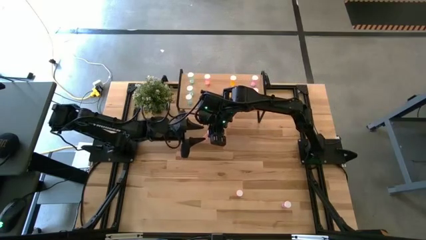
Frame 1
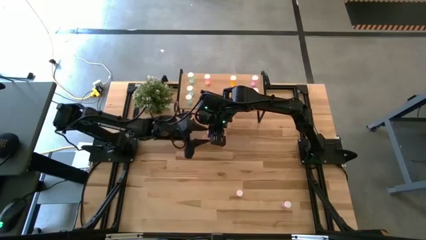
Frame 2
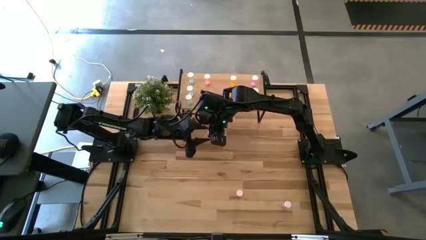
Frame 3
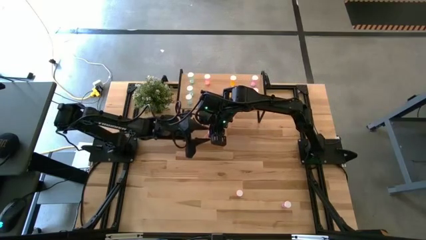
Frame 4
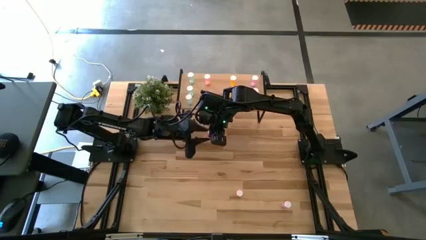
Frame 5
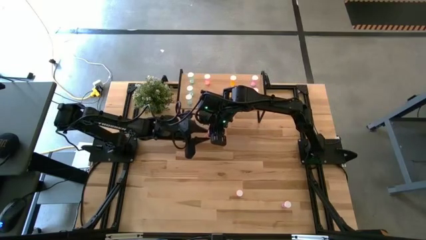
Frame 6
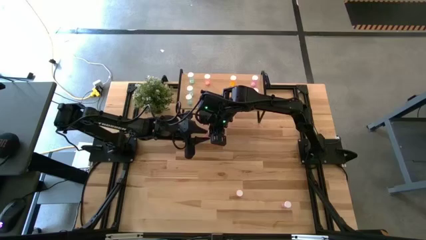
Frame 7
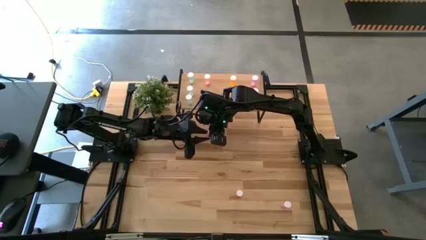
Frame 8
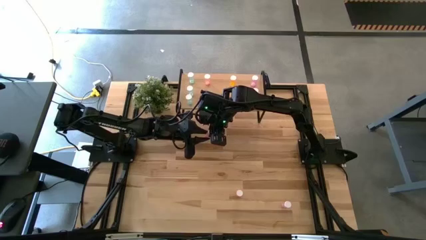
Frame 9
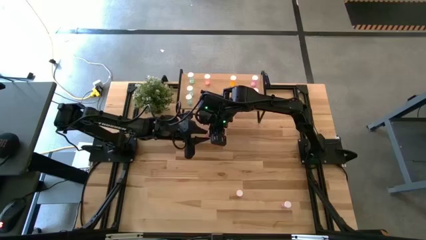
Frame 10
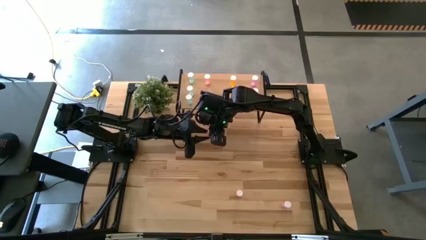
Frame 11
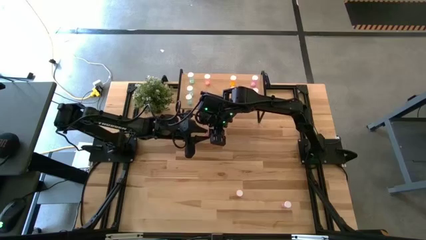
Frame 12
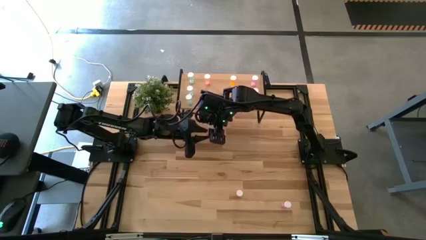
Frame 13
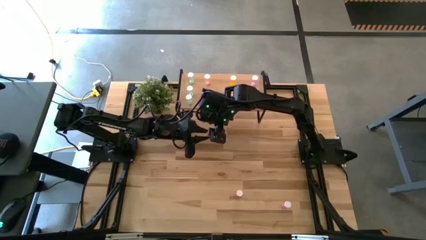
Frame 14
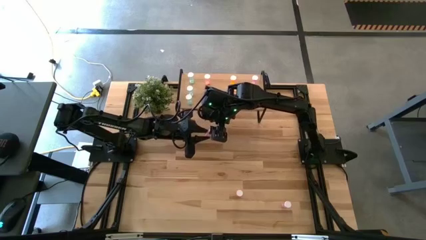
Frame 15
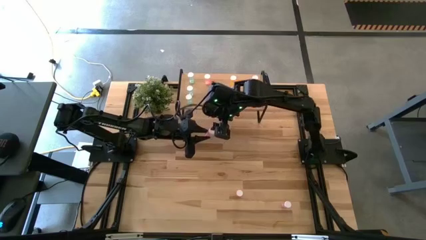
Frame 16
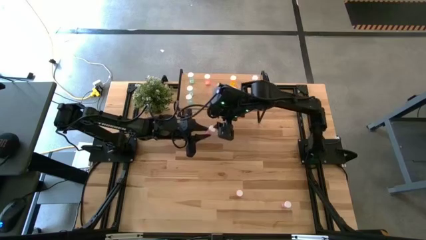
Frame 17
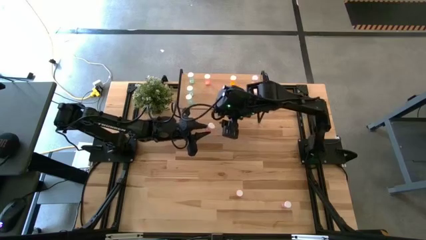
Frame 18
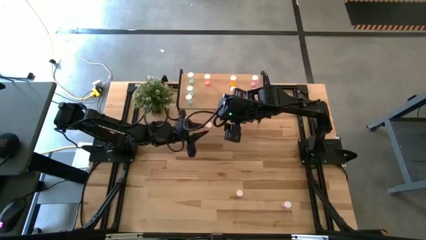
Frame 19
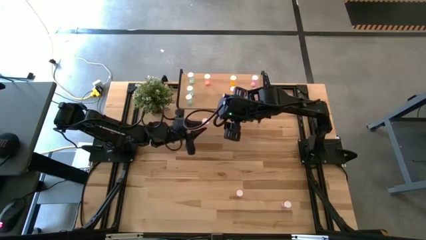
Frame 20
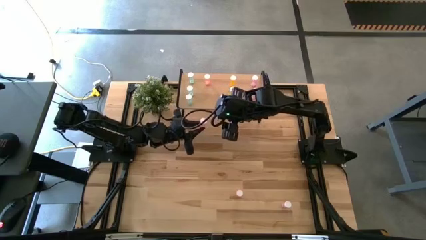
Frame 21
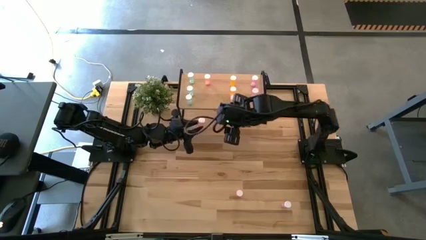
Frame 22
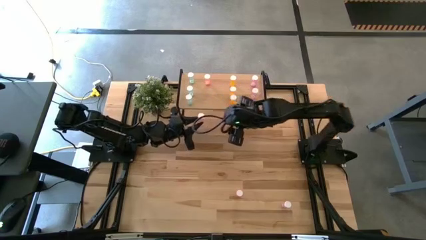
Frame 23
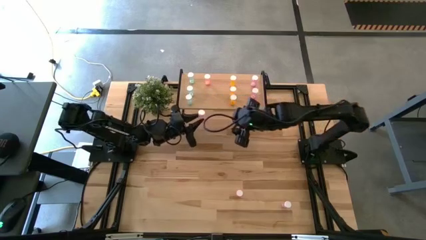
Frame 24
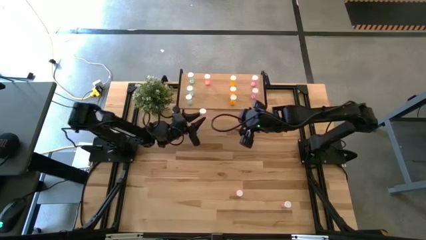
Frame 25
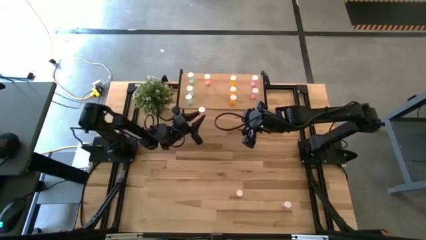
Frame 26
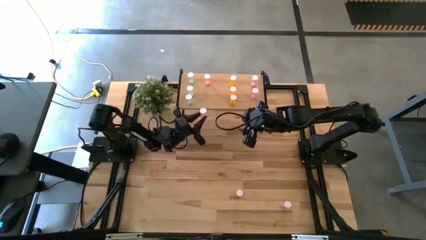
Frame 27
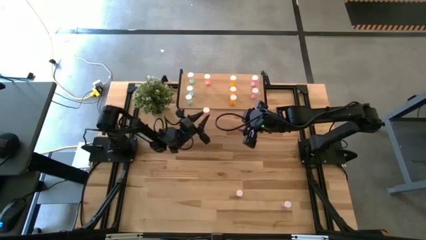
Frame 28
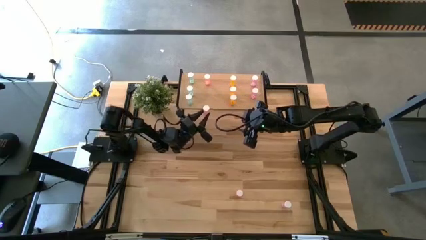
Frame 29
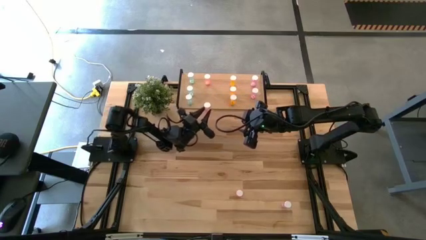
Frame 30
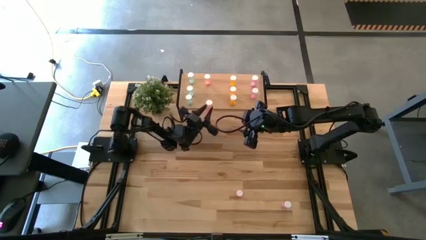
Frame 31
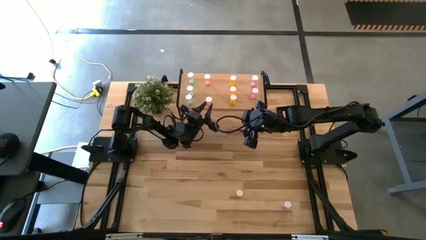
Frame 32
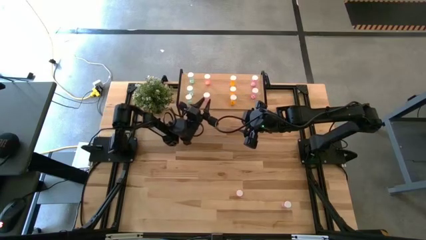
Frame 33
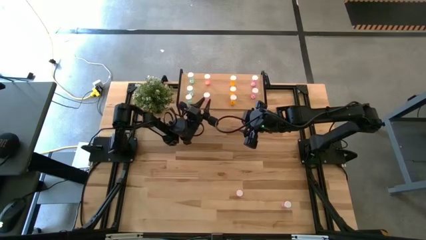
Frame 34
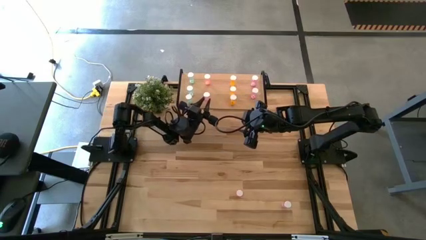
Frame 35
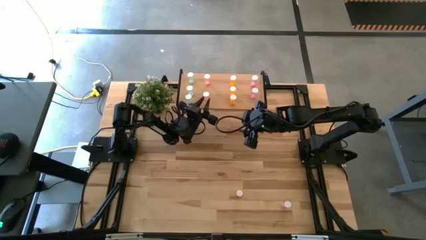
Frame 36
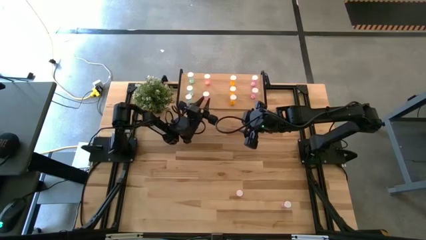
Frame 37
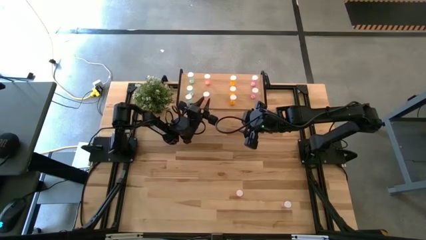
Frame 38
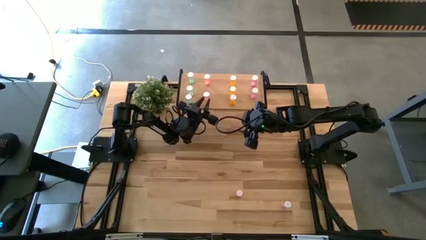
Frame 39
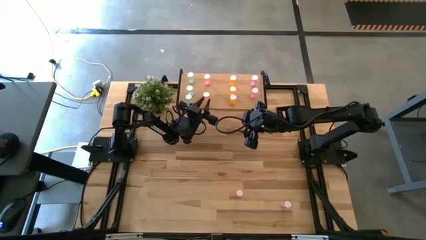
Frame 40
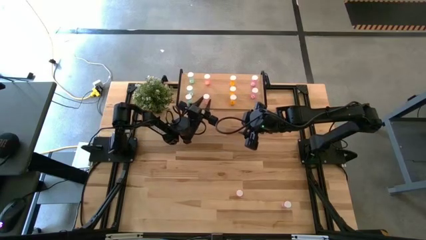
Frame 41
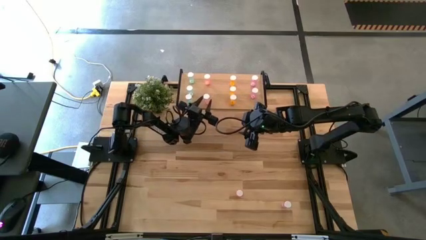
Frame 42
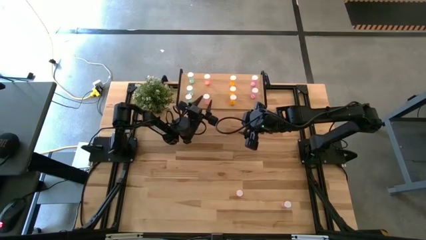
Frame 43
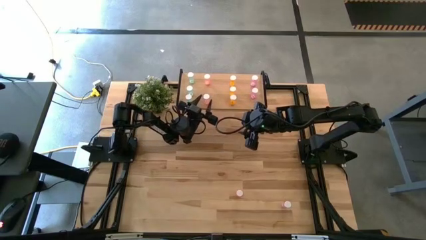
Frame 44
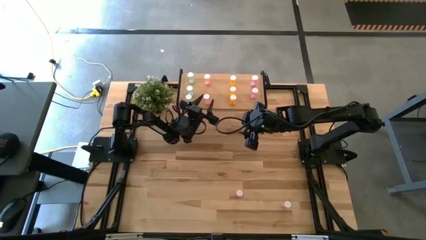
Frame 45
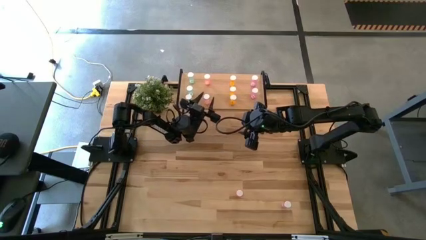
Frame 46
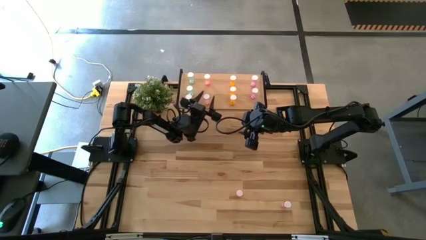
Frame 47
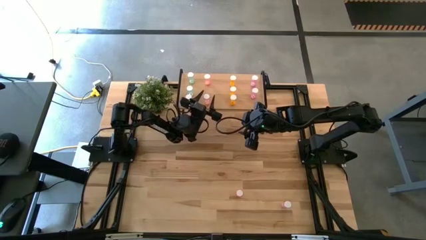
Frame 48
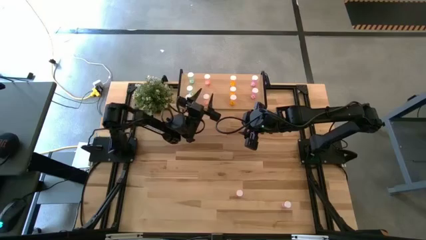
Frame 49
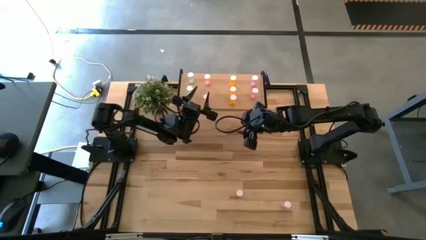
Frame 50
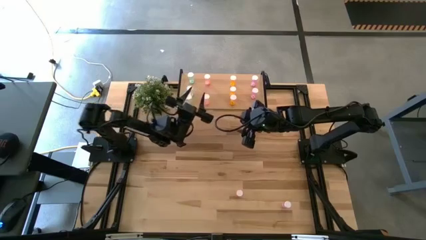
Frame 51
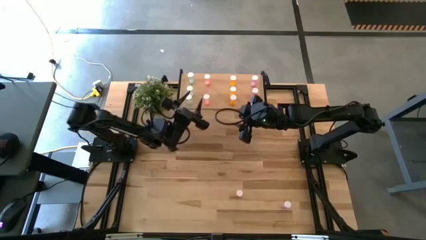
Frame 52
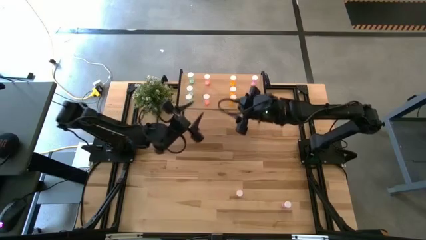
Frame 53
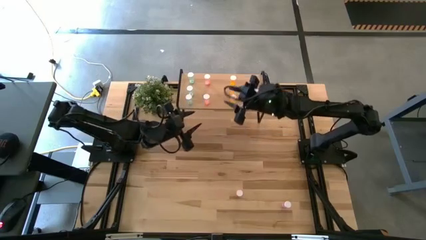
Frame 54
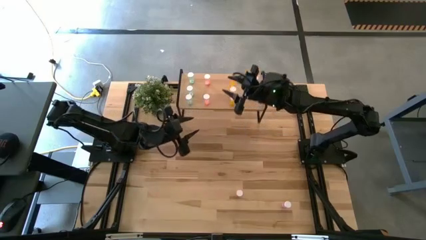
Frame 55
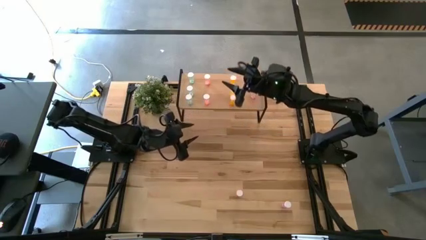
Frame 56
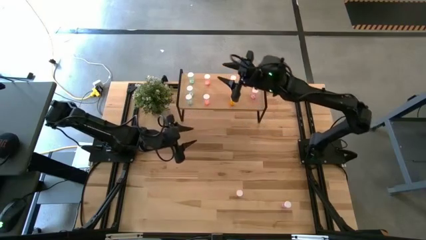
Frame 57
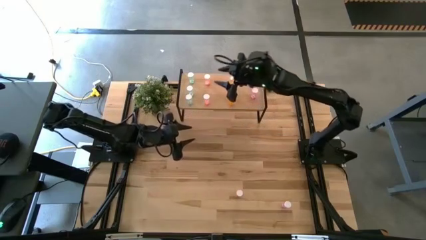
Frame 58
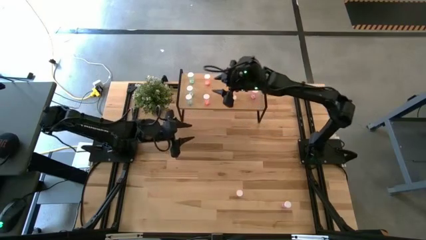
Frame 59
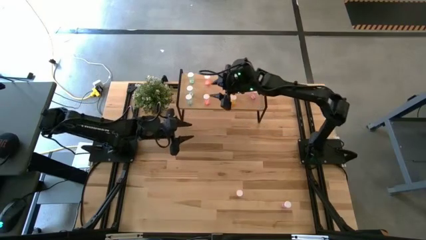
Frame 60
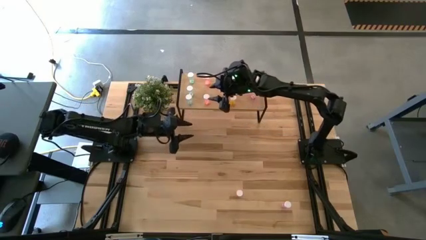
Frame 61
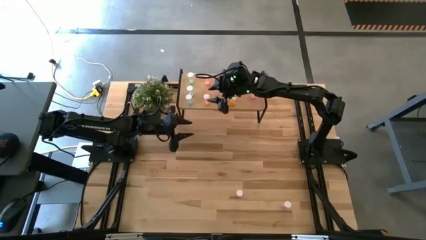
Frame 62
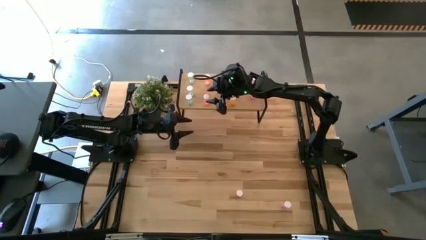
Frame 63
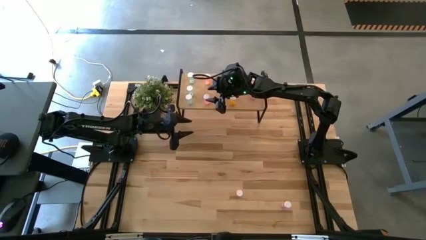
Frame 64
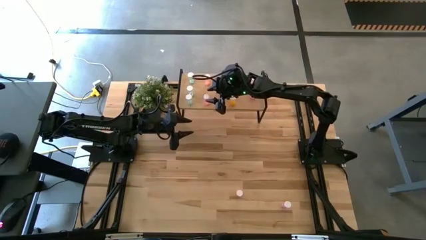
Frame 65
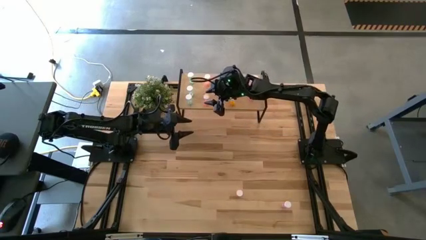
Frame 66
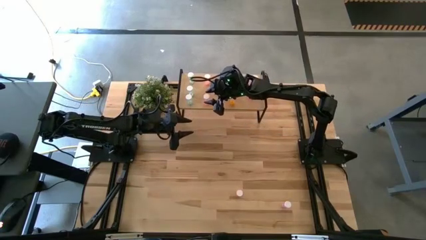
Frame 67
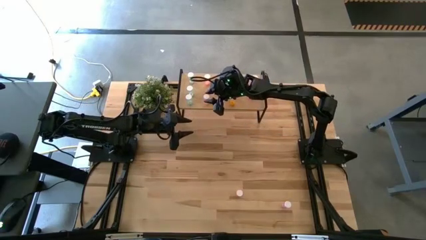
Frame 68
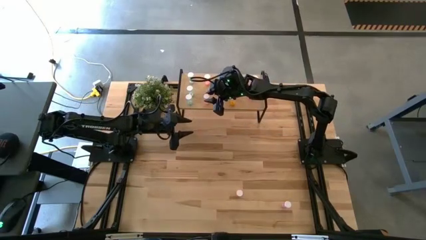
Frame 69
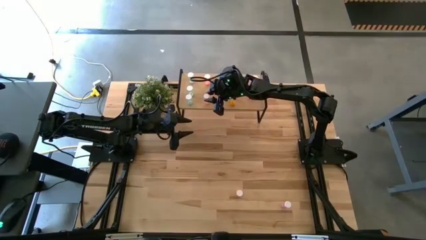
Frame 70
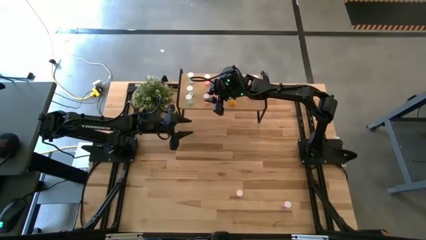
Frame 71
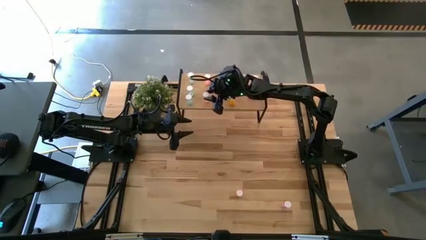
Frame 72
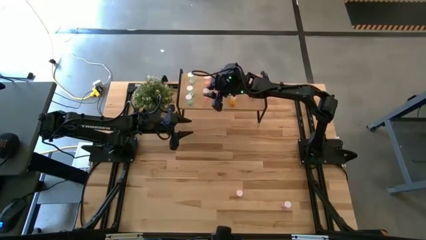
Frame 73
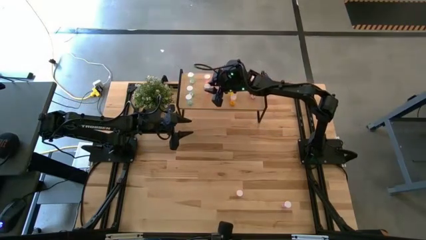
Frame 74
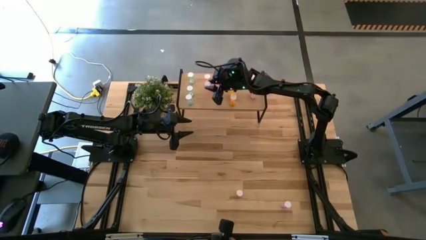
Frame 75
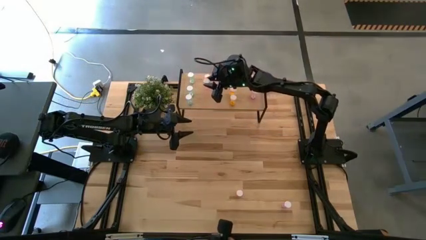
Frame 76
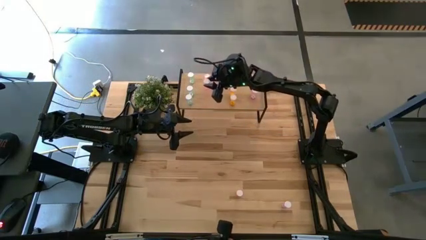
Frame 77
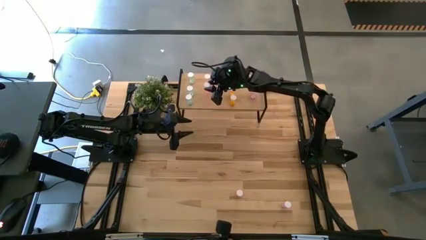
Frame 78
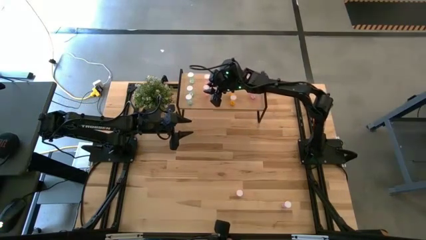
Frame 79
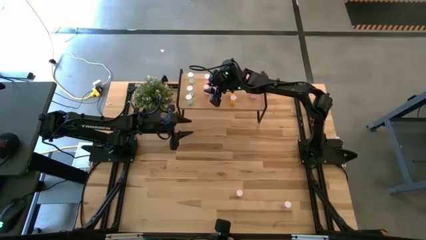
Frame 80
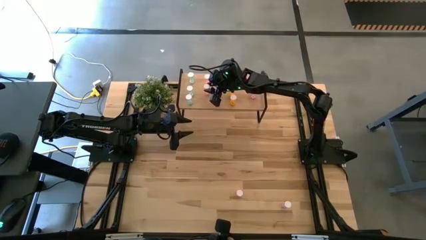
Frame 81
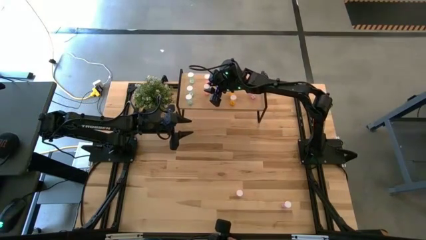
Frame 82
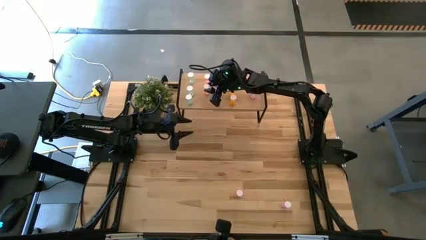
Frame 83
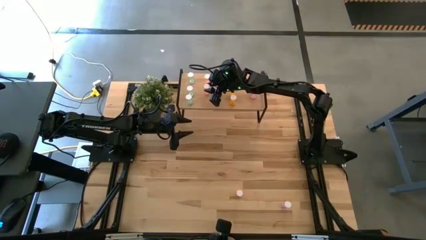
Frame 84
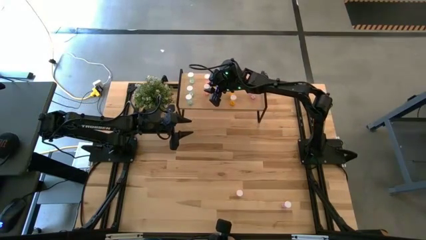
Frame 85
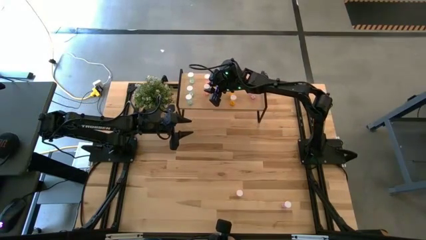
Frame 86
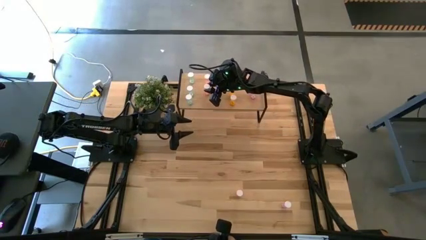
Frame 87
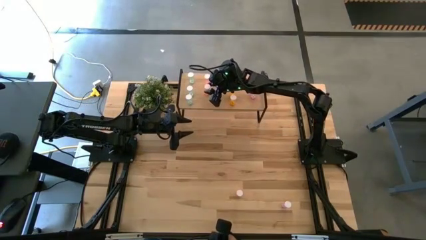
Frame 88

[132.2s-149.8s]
Task: Pick and place medicine bottles onto shelf by color
Put the top pink pill bottle on the shelf aligned with the other pink pill bottle
